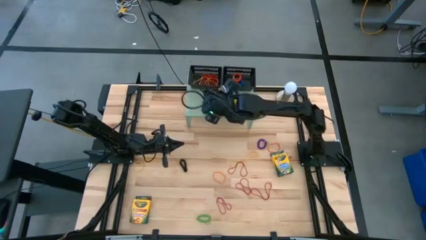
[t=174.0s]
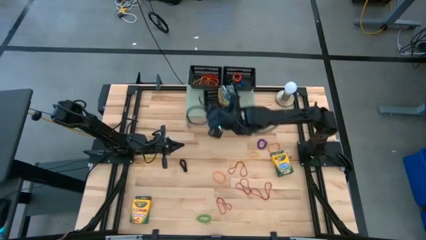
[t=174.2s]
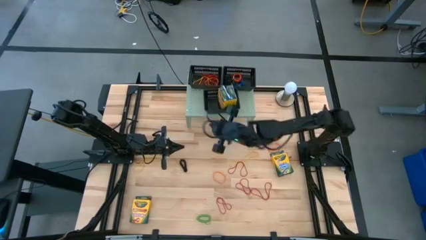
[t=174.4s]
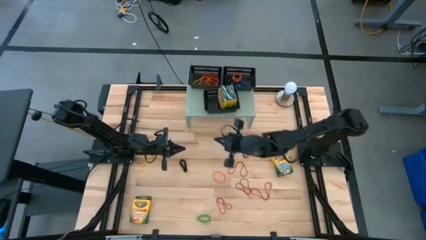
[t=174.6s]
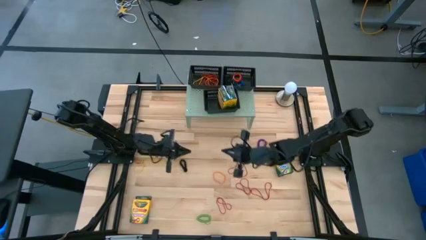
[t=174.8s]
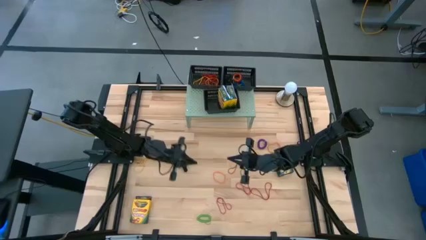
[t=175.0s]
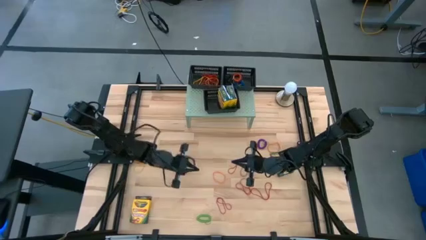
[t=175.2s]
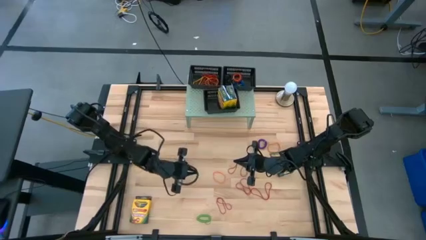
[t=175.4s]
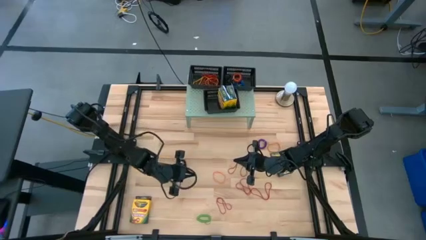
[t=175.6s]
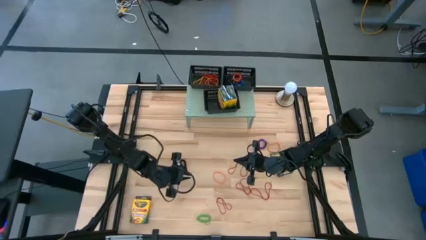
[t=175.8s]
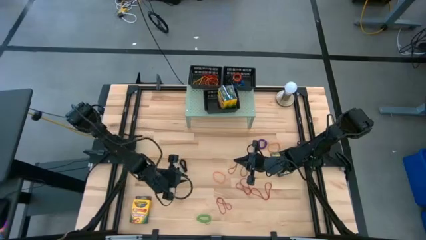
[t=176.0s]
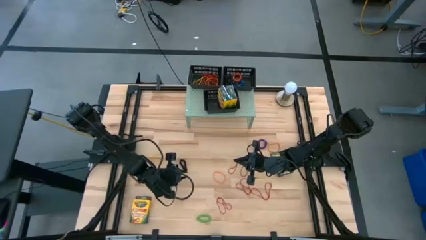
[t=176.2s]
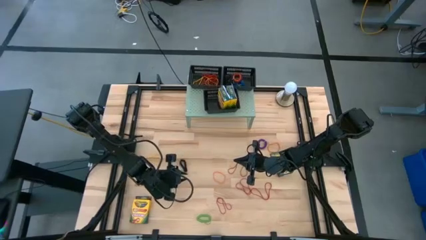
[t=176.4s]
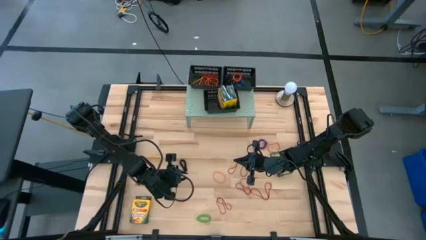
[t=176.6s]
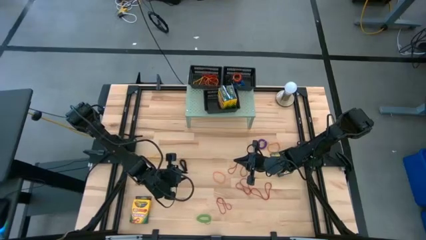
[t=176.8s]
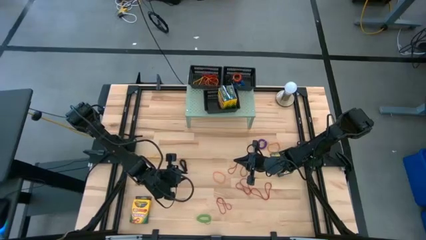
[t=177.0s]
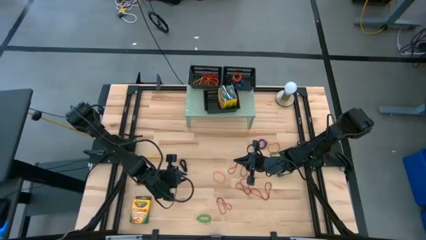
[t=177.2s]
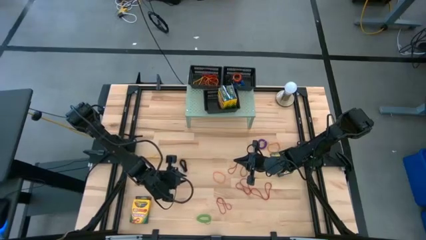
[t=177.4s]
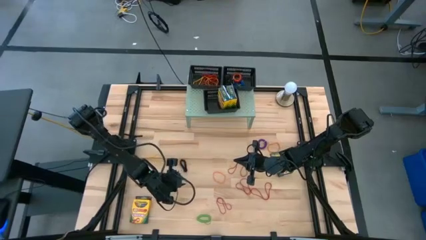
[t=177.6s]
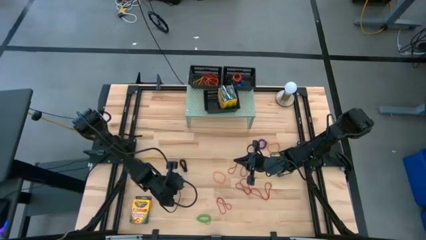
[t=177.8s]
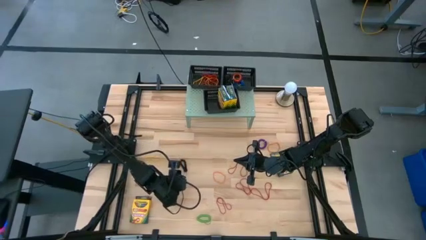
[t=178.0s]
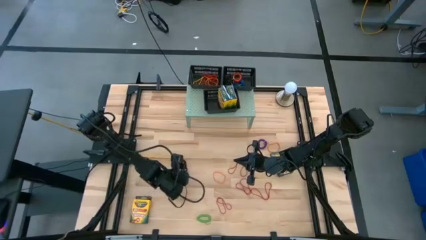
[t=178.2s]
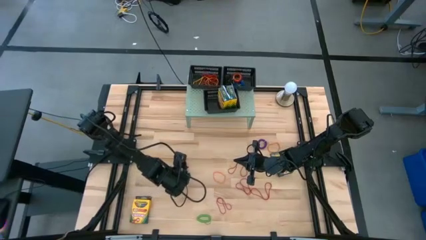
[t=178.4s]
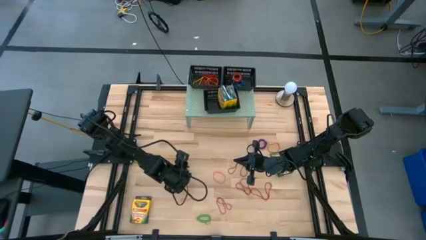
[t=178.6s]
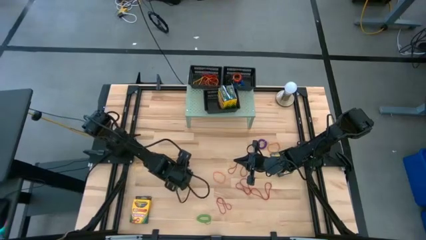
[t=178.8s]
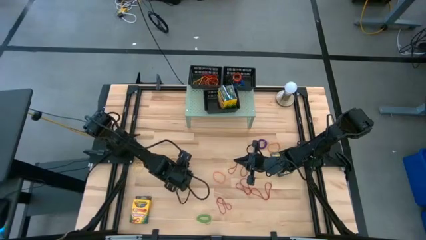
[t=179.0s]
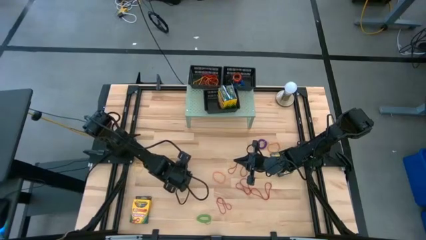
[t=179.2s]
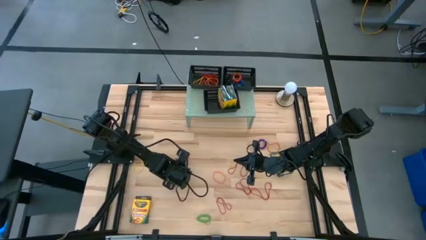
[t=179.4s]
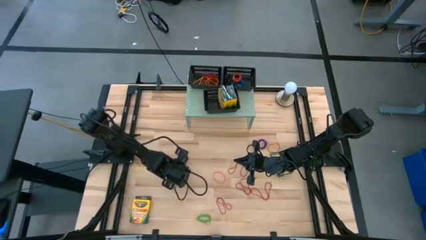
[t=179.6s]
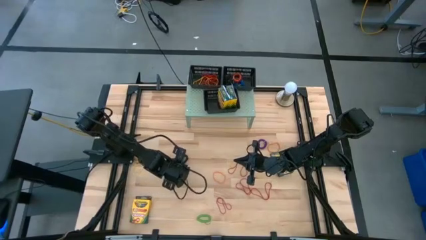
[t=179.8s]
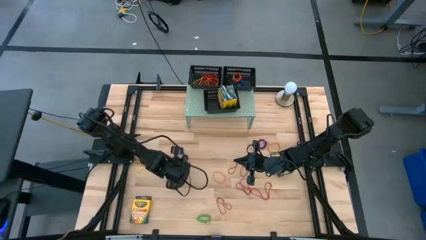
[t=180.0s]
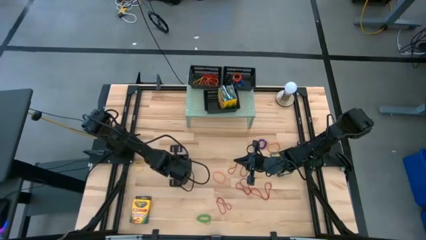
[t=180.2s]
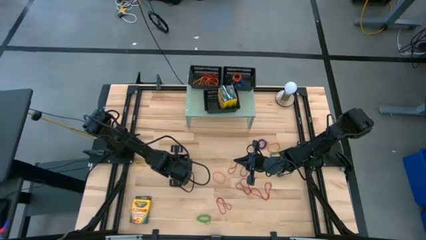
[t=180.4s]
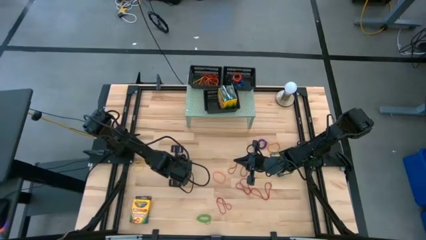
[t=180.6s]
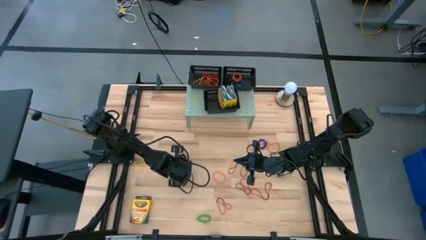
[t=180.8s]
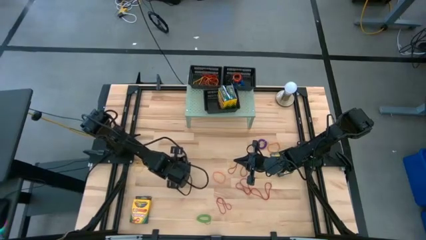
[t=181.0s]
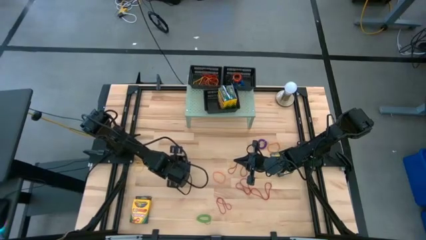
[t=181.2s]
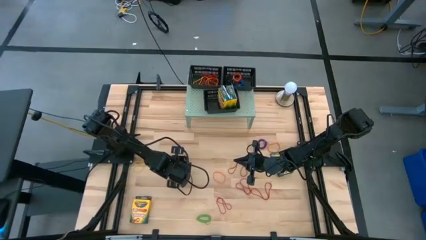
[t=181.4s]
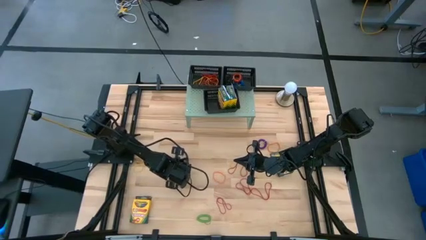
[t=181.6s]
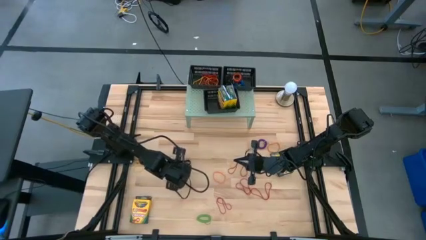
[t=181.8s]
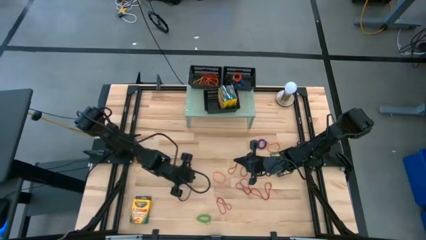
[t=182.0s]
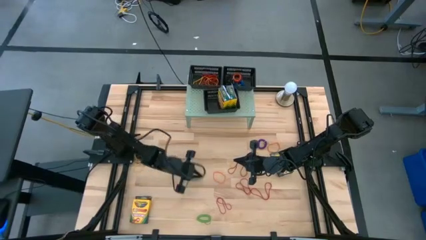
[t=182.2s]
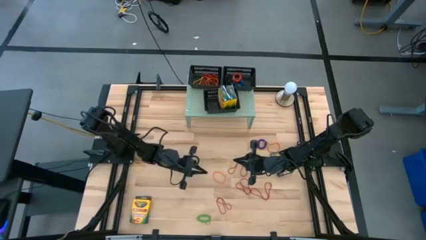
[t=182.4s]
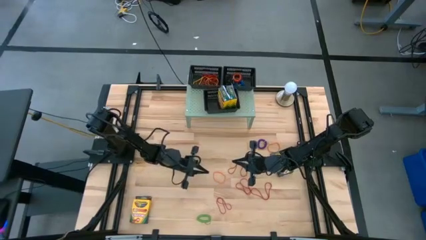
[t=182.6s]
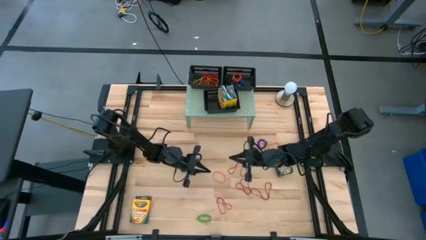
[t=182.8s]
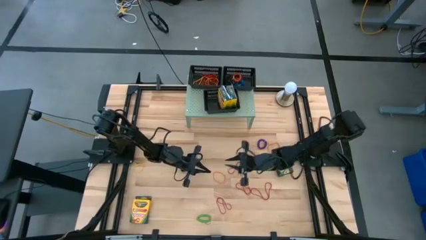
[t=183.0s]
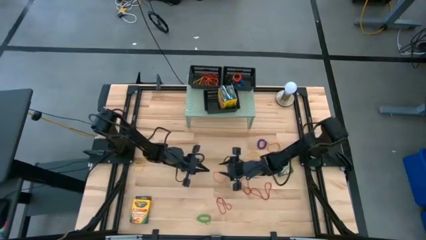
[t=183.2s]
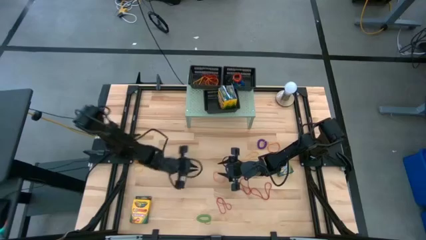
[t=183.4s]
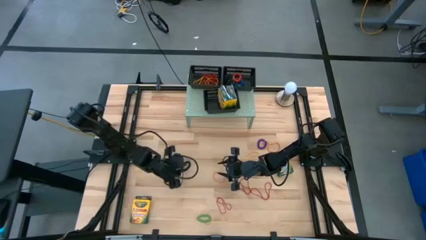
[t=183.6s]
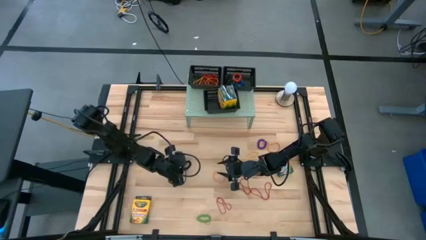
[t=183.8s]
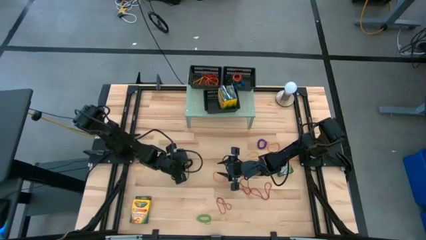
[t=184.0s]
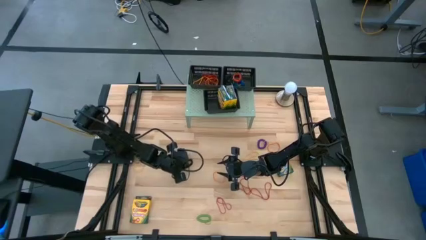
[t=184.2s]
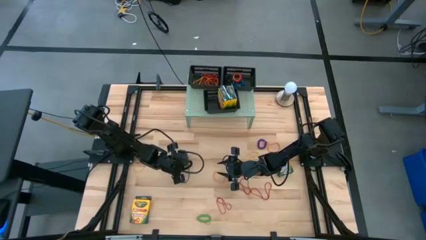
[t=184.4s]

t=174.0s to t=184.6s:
Task: Pick & Place Office Desk Supplies
Put the black spiral keychain the top right black bin

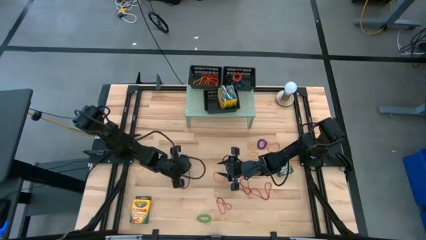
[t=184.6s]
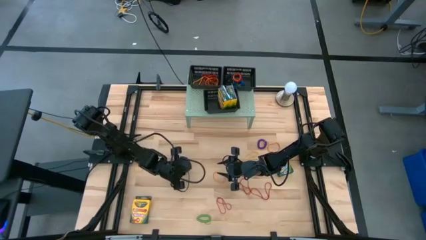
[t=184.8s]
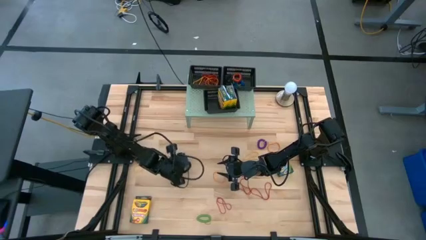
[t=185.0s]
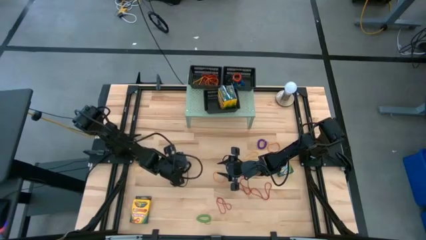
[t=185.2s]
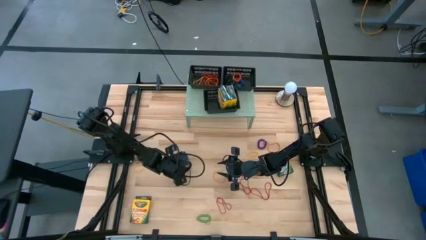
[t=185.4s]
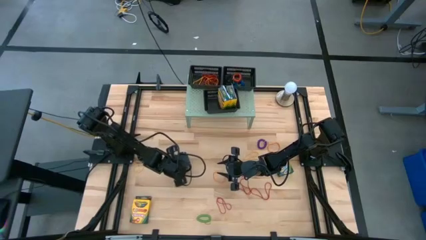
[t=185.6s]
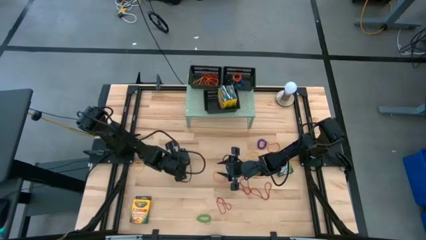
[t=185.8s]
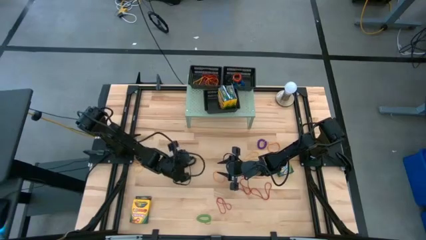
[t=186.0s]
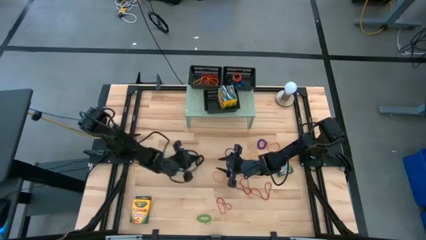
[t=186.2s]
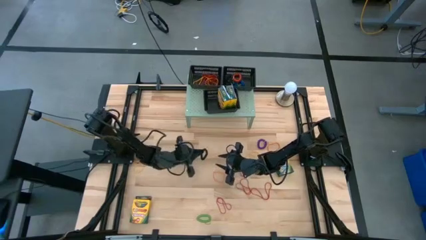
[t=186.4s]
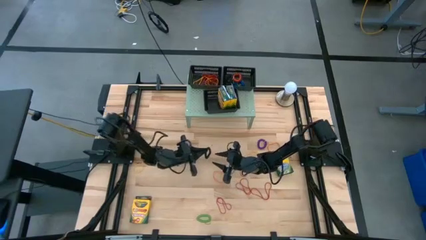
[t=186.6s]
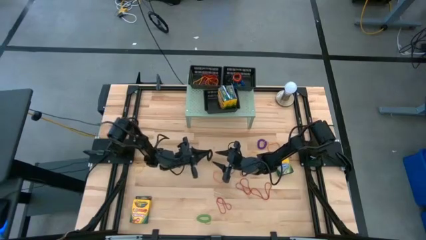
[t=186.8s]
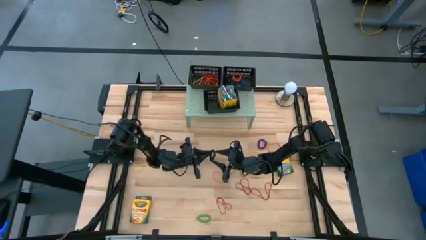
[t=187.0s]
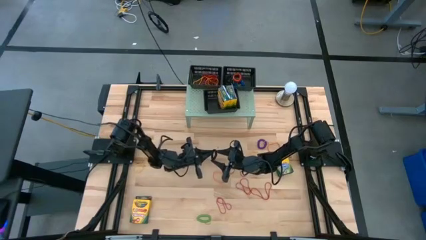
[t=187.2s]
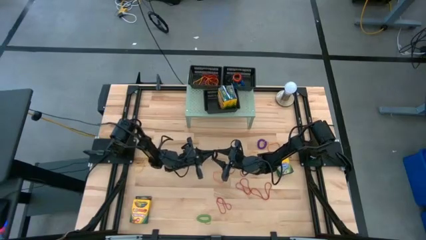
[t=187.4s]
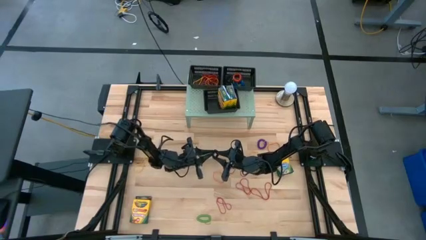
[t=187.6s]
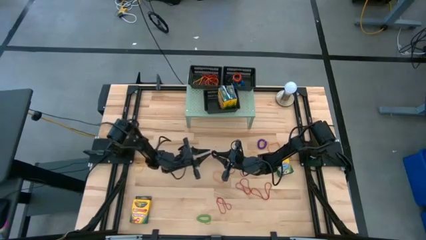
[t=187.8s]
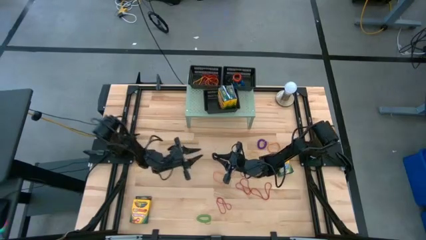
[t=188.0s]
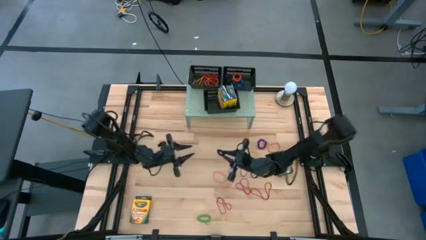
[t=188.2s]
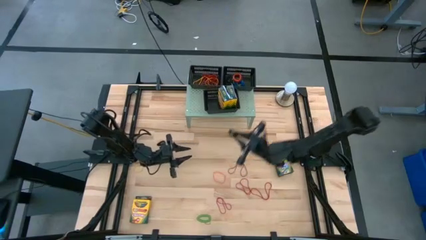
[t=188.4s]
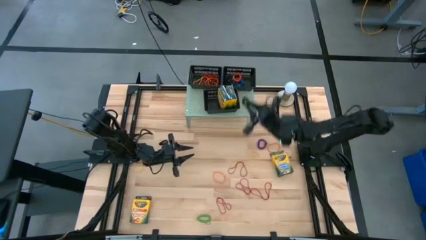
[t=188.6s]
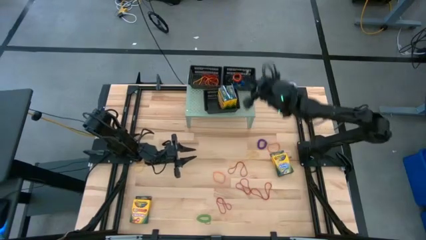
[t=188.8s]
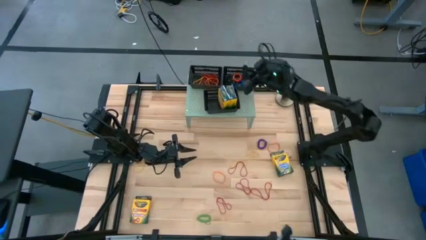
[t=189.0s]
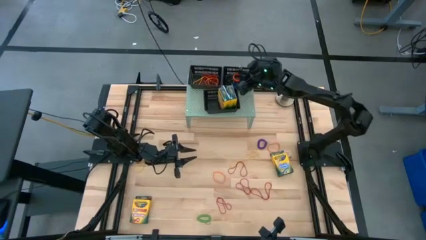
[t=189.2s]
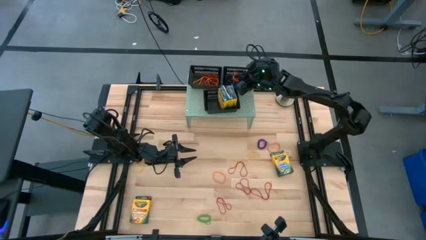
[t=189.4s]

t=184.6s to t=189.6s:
Put the black spiral keychain the top right black bin
